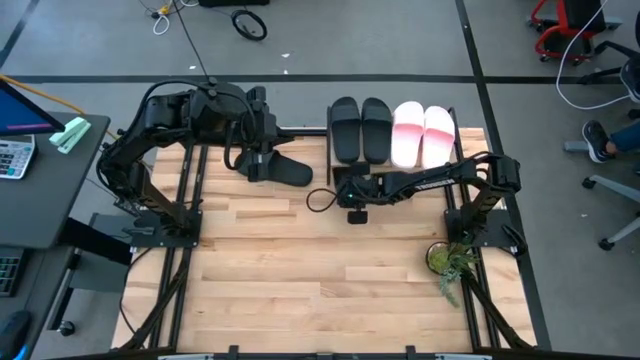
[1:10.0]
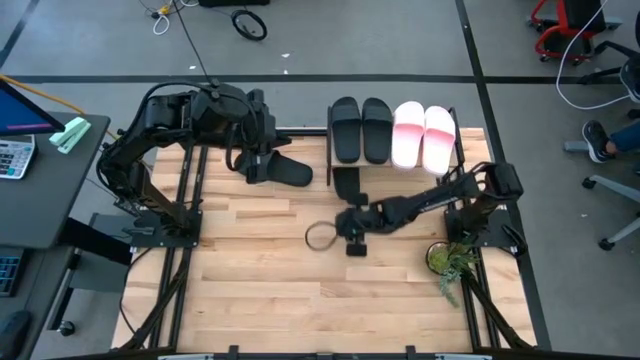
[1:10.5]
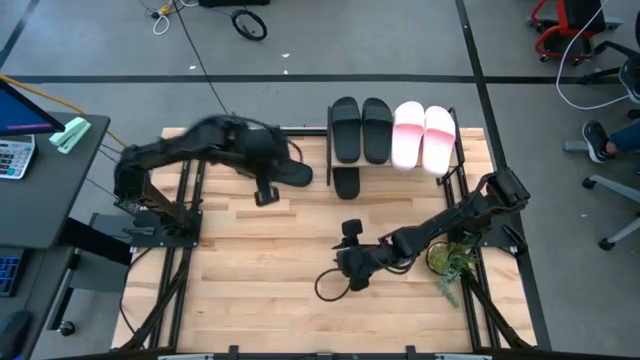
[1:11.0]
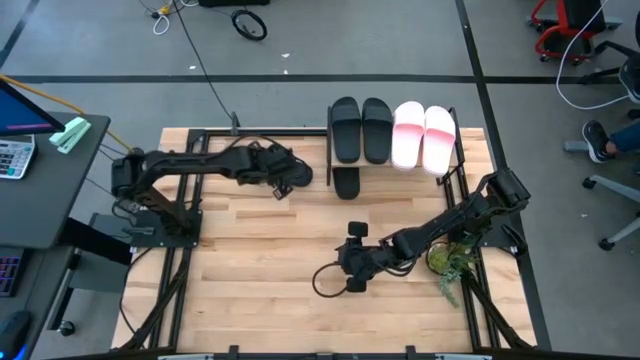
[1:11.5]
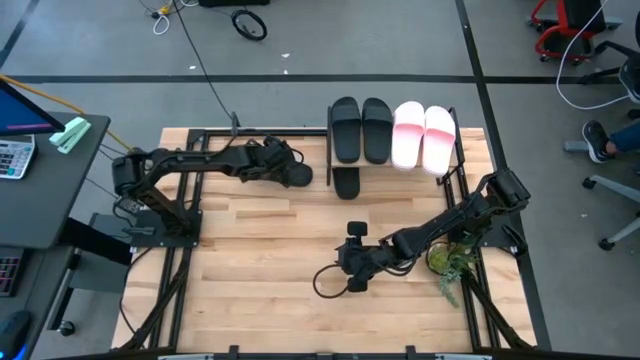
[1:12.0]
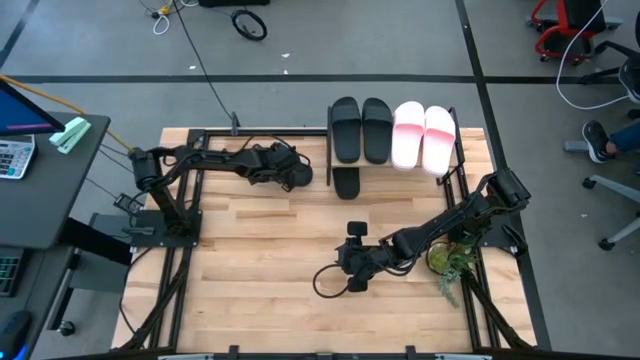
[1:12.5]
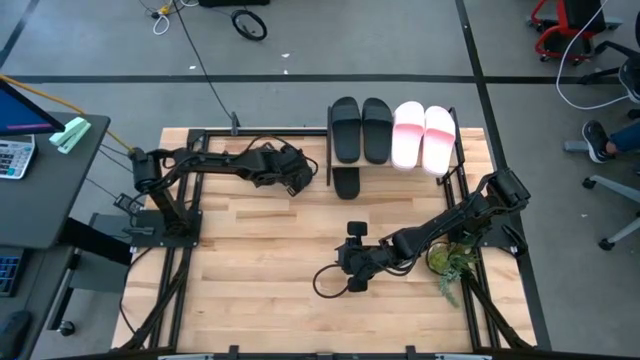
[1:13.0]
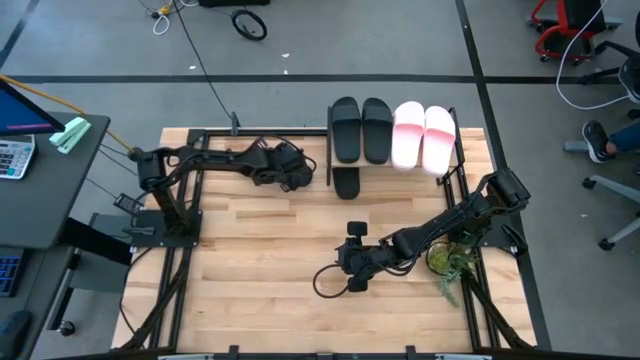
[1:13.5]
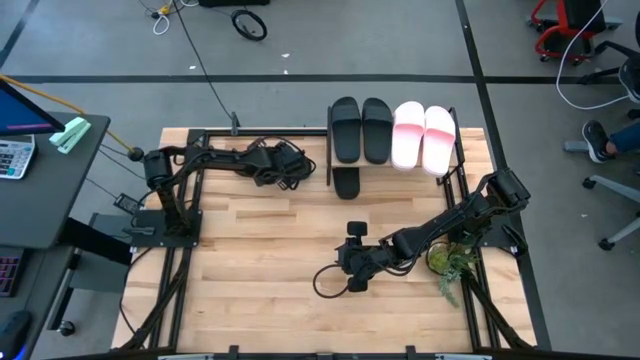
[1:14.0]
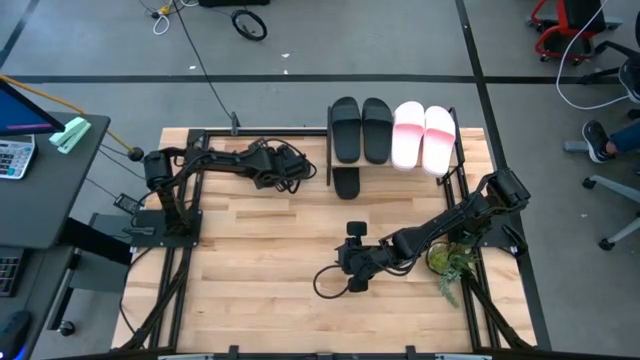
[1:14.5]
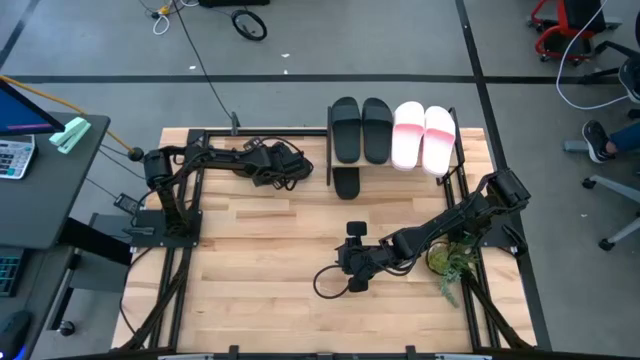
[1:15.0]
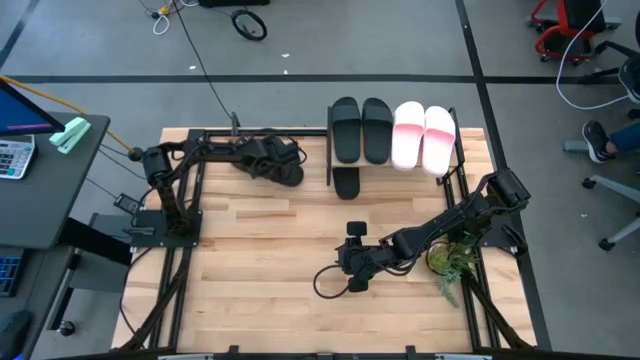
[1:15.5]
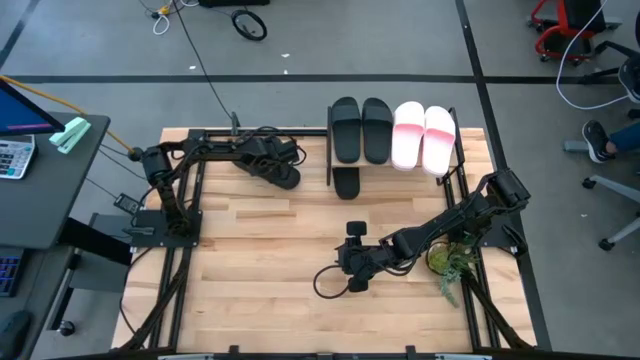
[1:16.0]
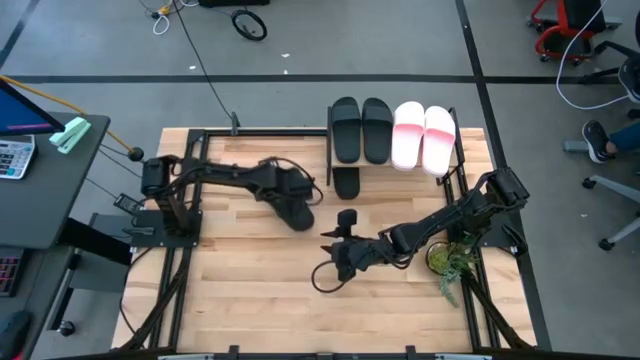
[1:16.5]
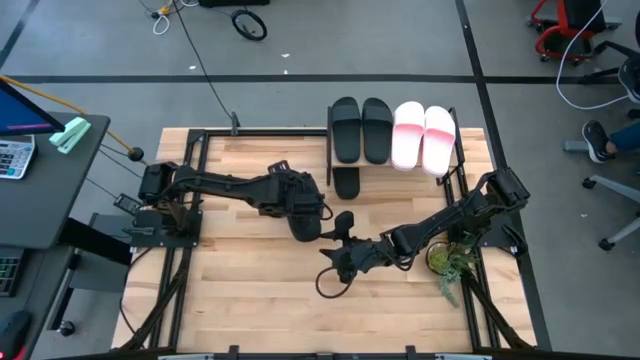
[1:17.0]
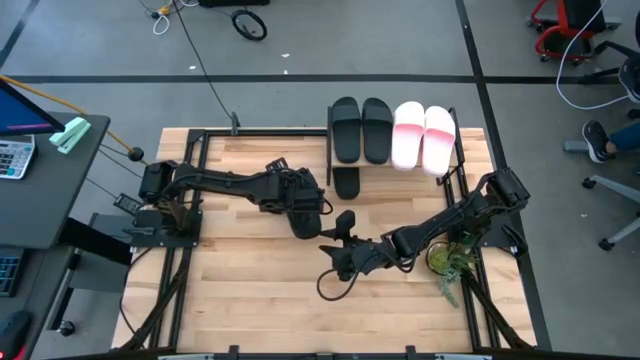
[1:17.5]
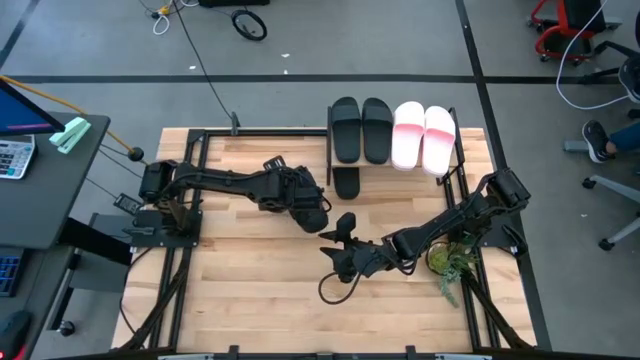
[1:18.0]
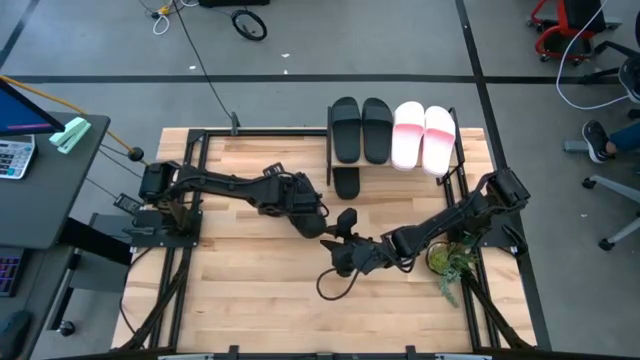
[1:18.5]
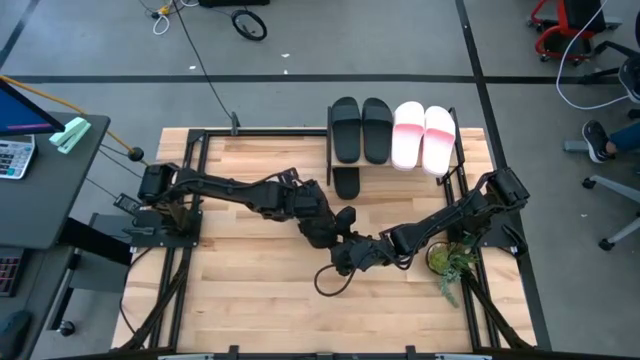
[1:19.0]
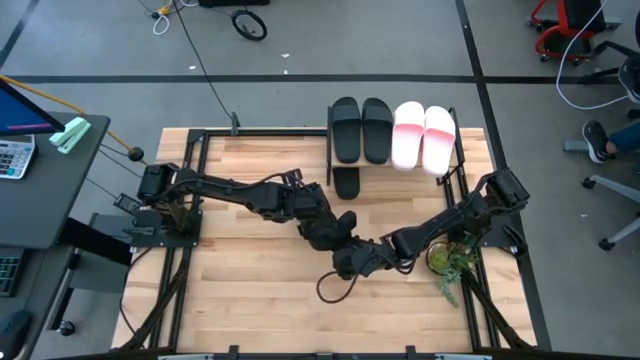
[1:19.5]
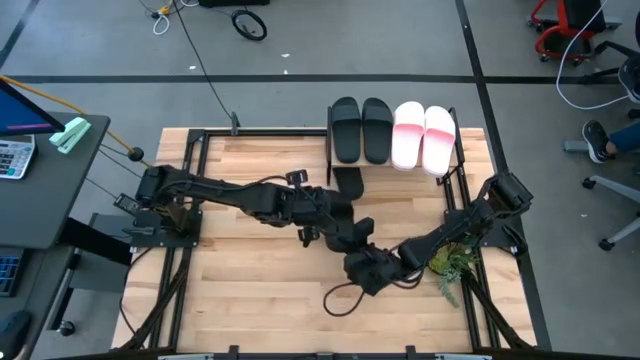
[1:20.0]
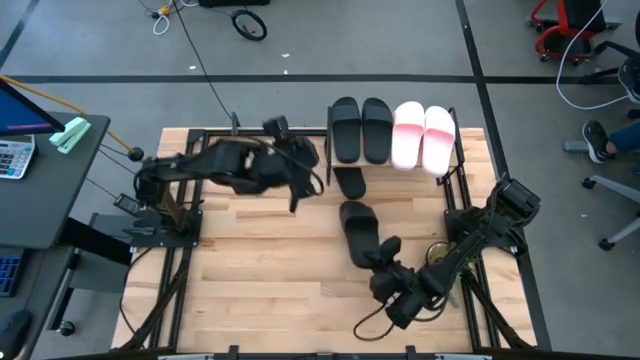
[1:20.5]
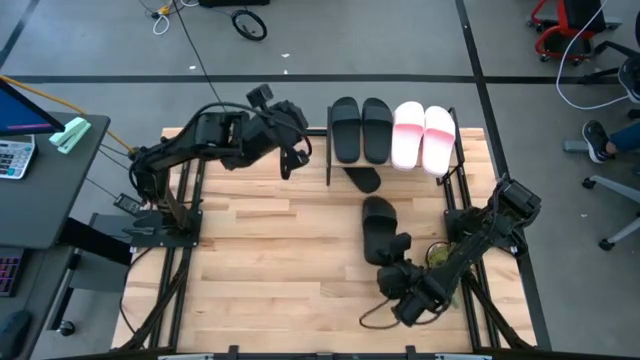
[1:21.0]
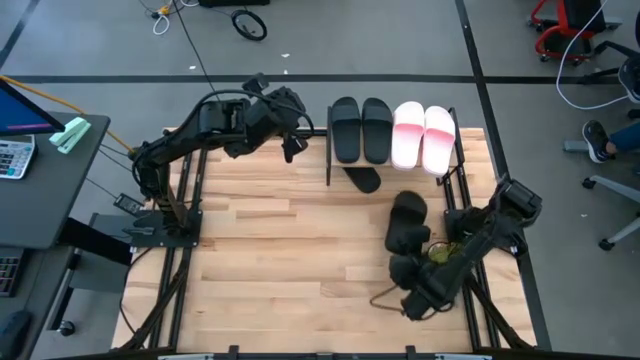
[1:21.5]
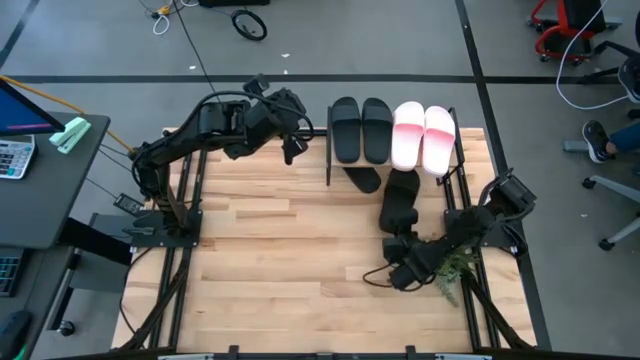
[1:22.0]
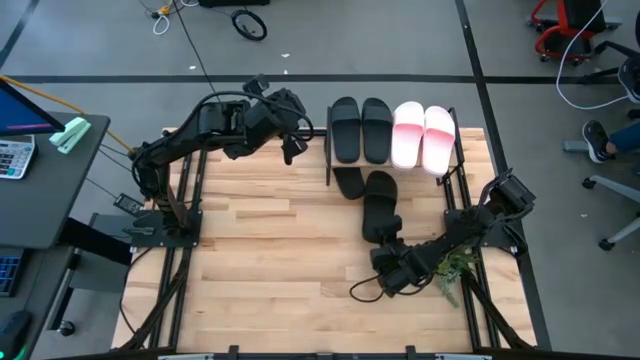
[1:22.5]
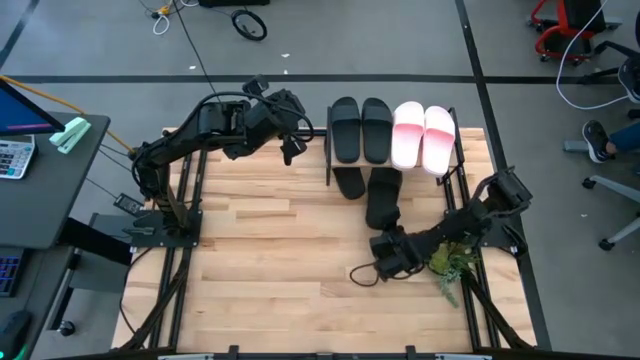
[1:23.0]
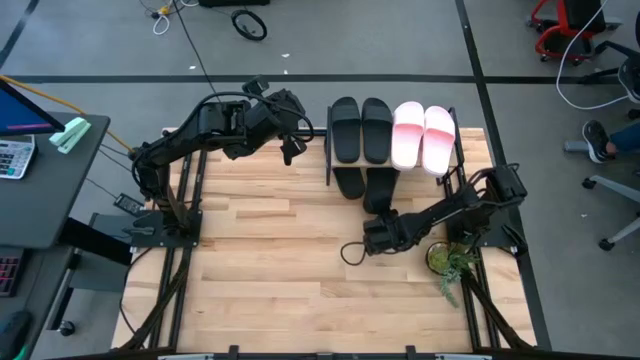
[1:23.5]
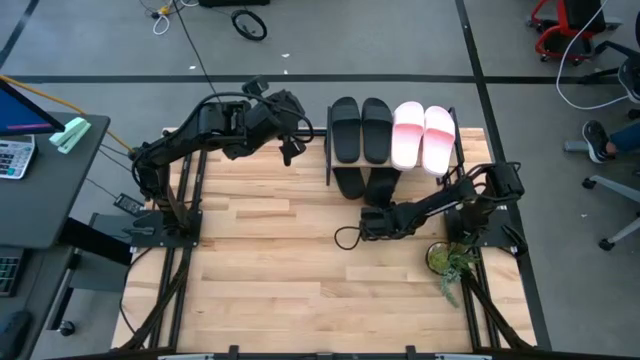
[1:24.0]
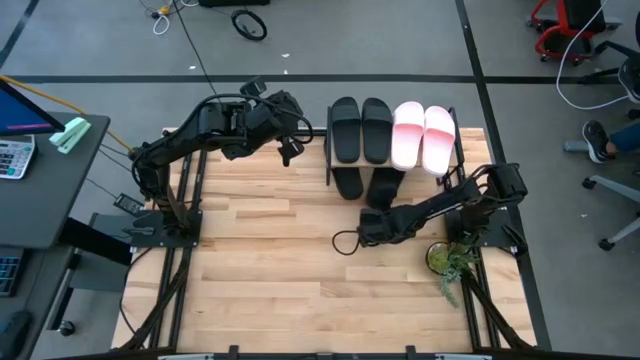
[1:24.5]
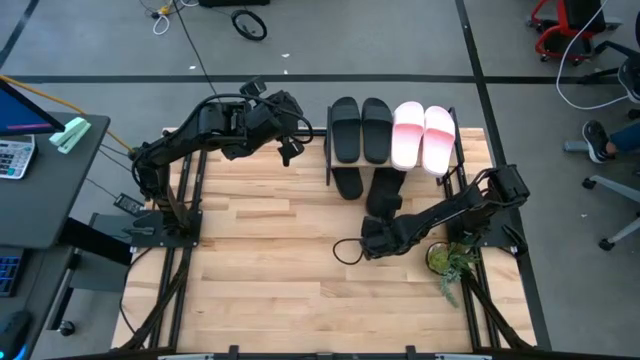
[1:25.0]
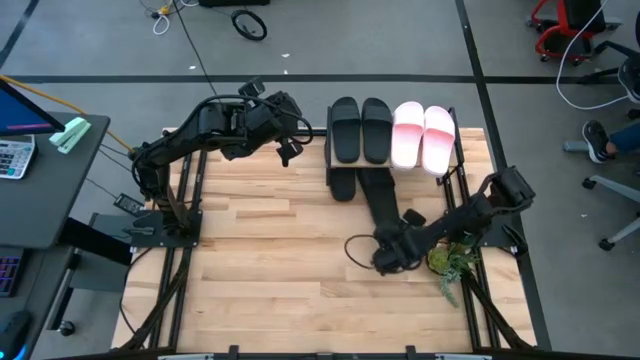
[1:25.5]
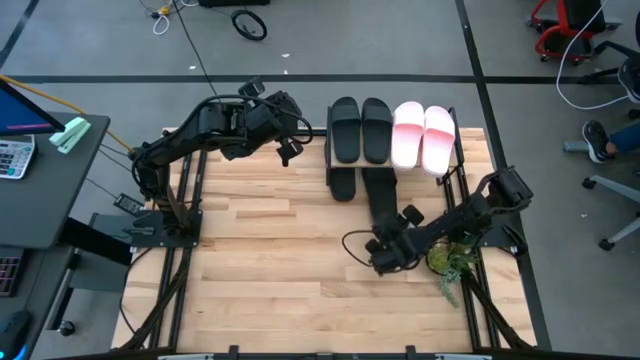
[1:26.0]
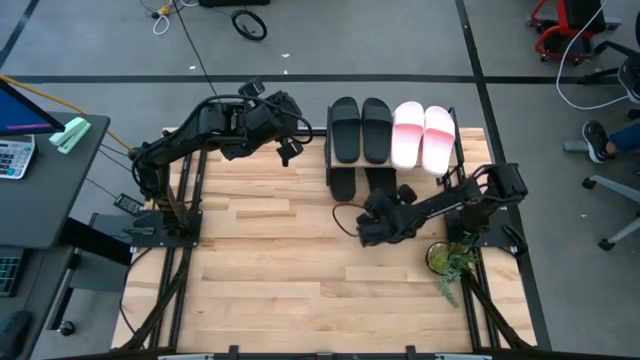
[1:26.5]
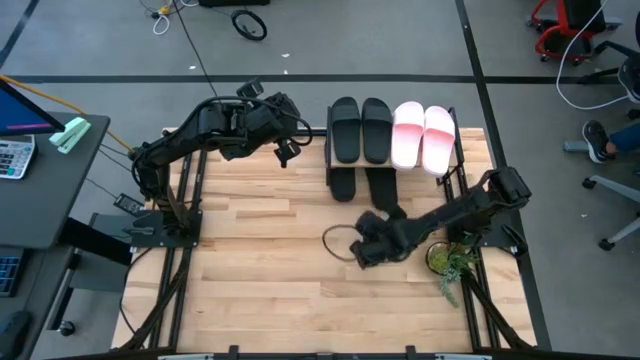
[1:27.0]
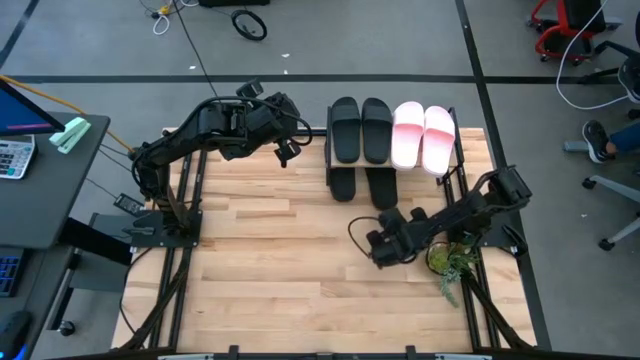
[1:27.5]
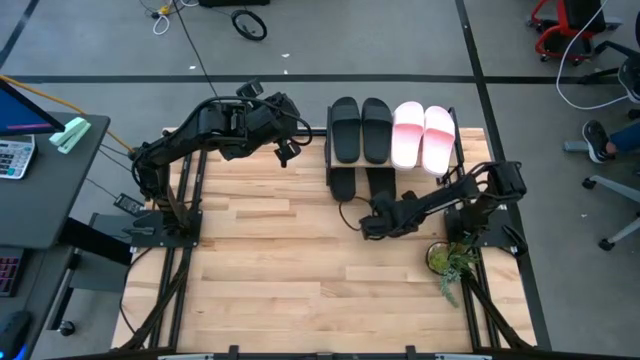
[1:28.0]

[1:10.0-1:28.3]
Task: Pick and place slides into the shelf
Put the black slide under the shelf

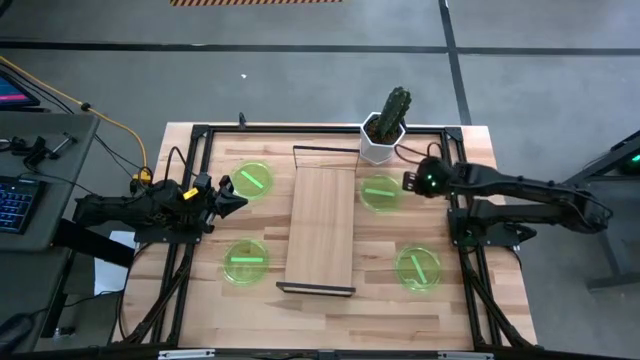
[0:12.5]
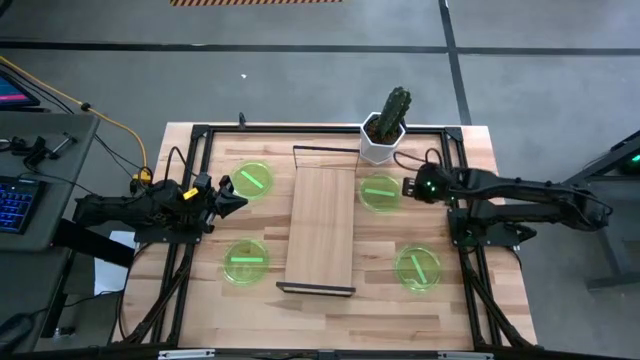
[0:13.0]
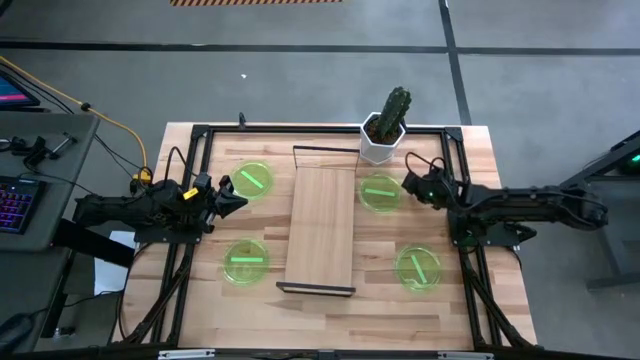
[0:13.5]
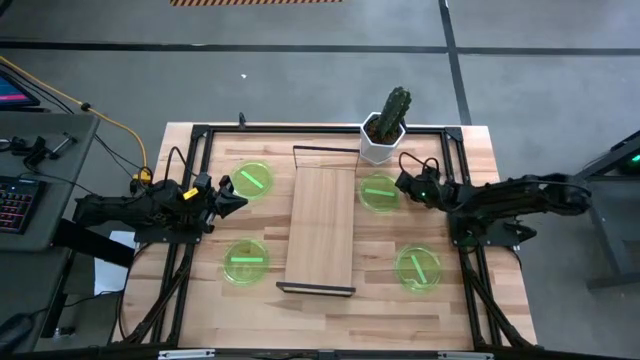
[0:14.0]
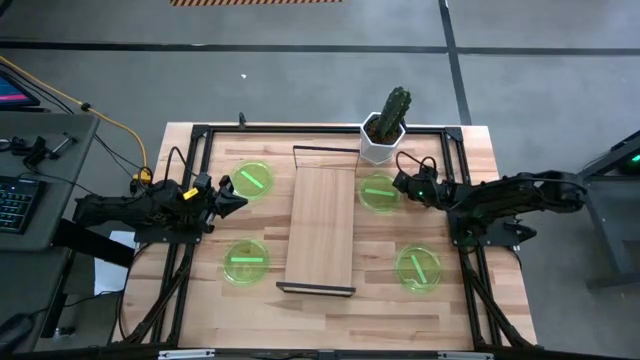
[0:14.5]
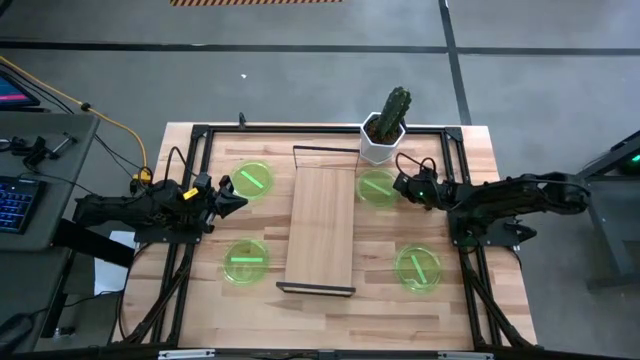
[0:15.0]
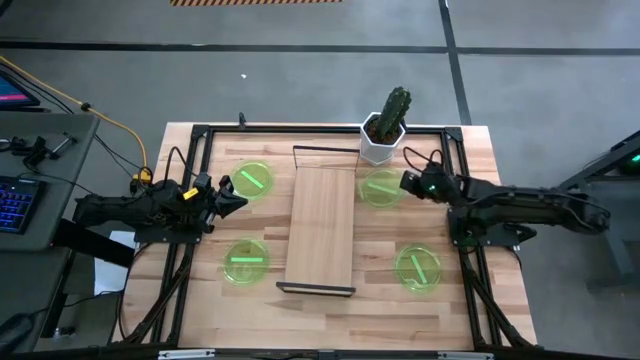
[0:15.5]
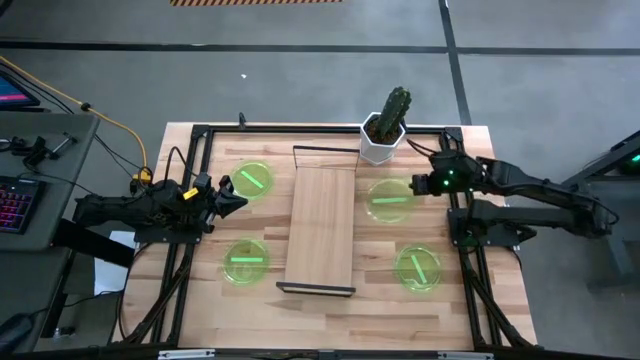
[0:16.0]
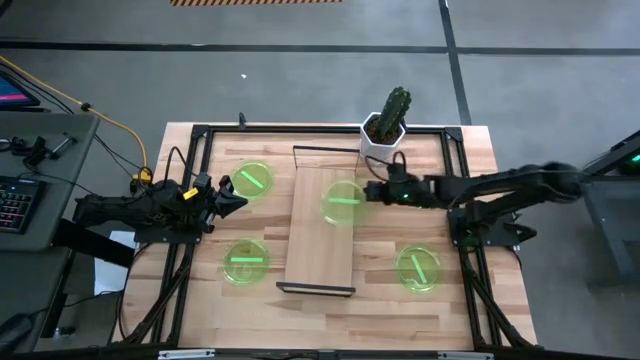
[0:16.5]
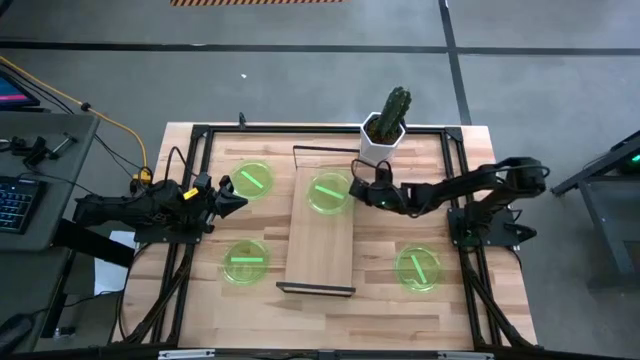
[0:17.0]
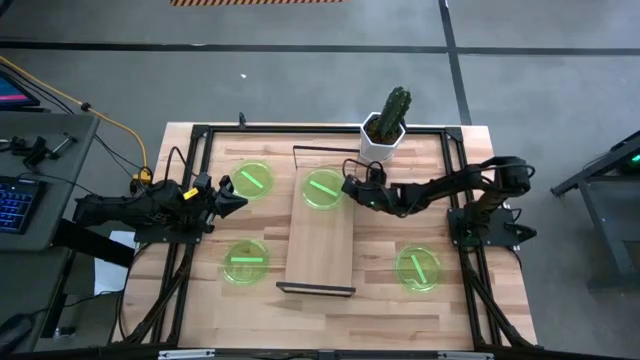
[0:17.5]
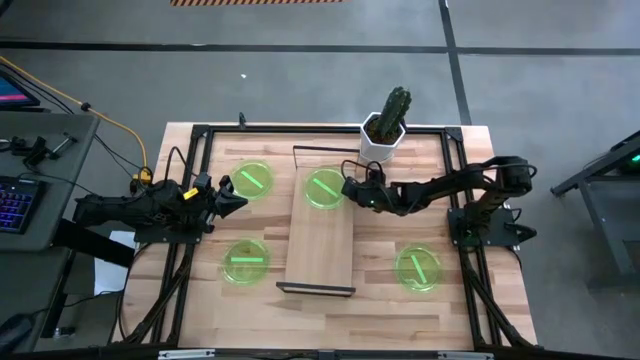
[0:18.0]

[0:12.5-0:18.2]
Task: Place and stack plates onto a shelf
Put the top right green plate on the shelf
